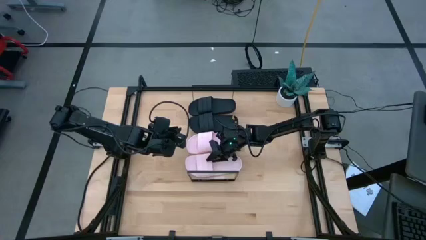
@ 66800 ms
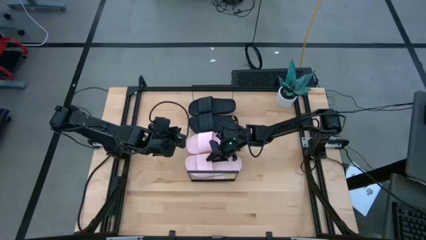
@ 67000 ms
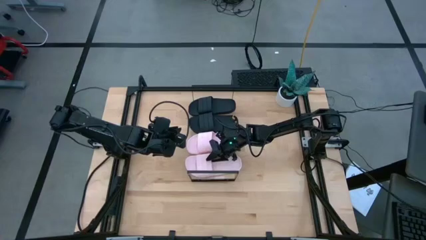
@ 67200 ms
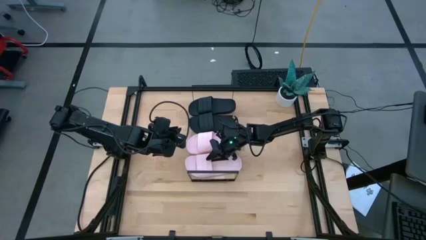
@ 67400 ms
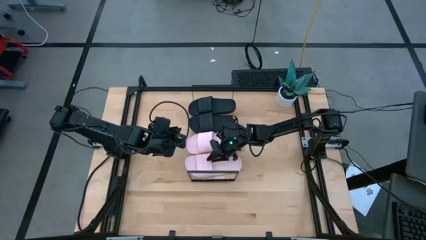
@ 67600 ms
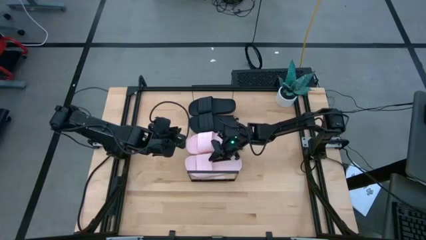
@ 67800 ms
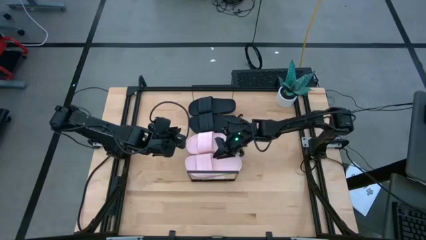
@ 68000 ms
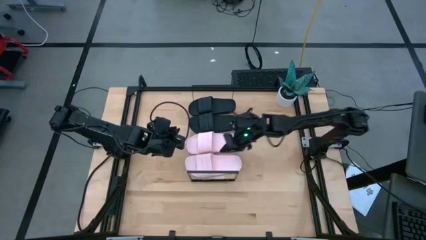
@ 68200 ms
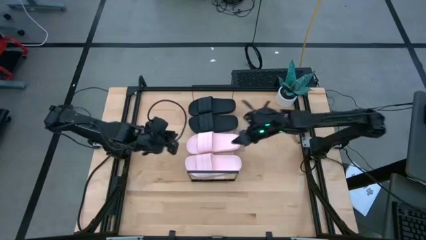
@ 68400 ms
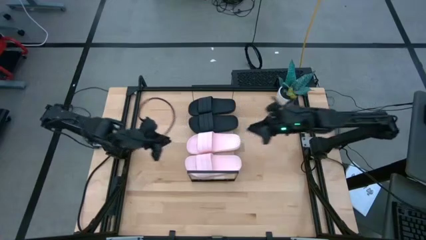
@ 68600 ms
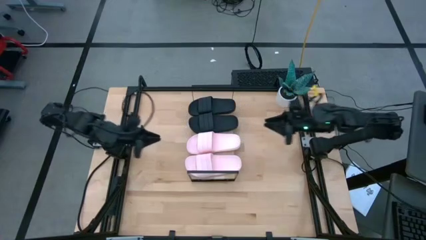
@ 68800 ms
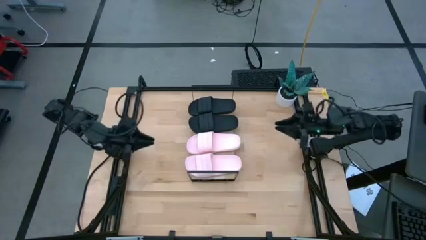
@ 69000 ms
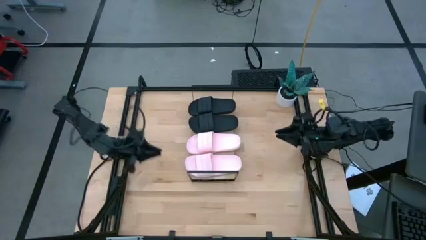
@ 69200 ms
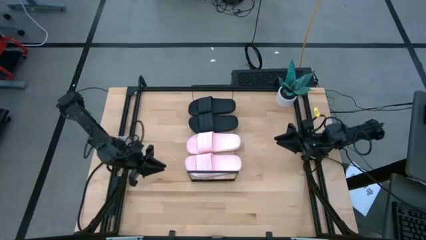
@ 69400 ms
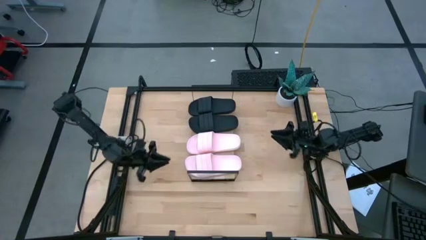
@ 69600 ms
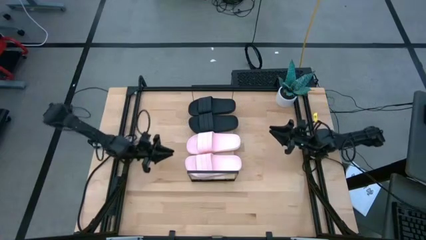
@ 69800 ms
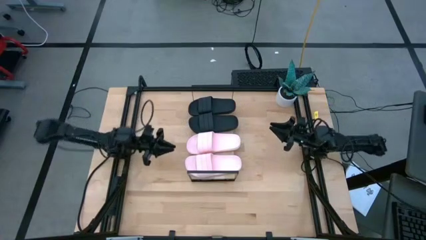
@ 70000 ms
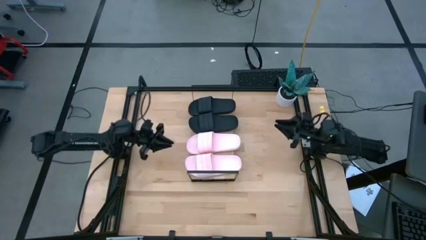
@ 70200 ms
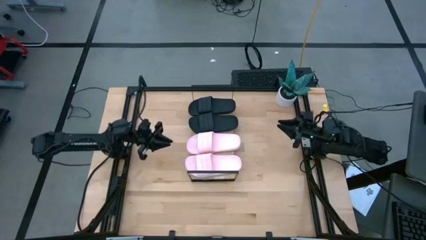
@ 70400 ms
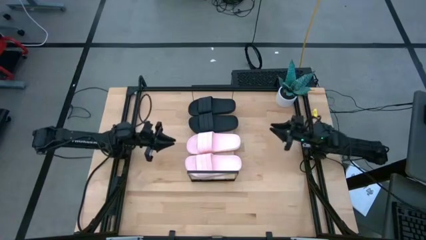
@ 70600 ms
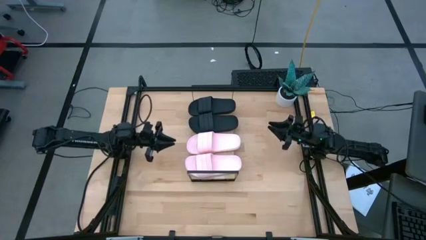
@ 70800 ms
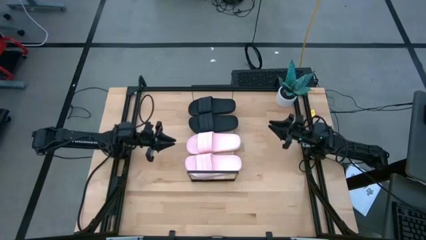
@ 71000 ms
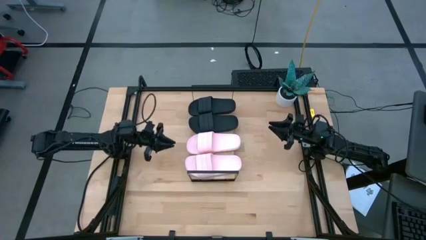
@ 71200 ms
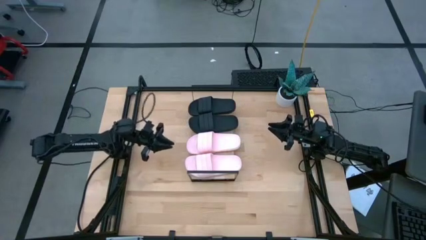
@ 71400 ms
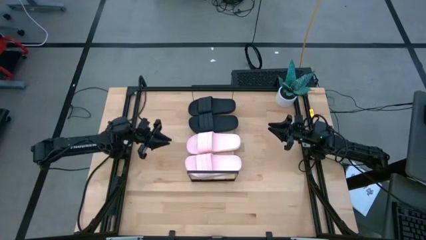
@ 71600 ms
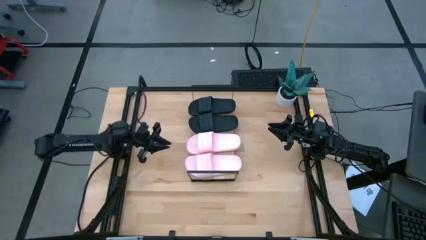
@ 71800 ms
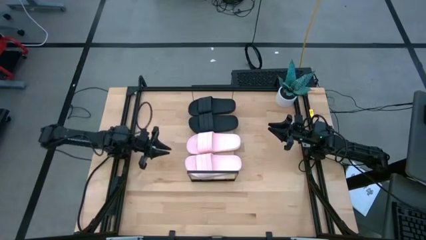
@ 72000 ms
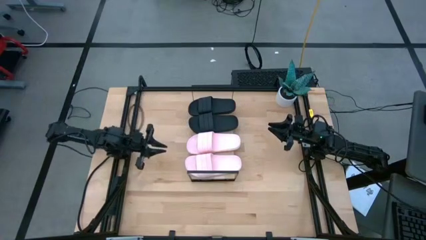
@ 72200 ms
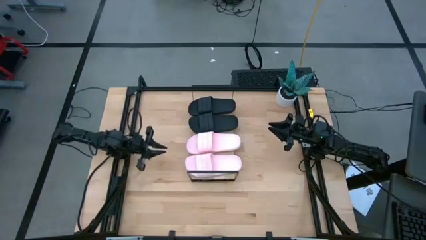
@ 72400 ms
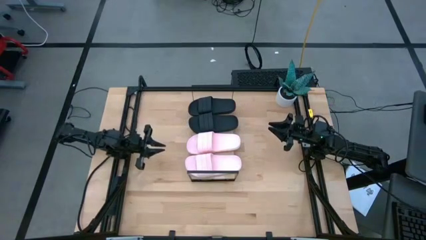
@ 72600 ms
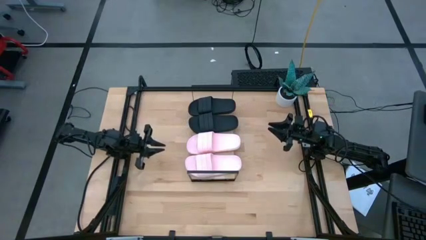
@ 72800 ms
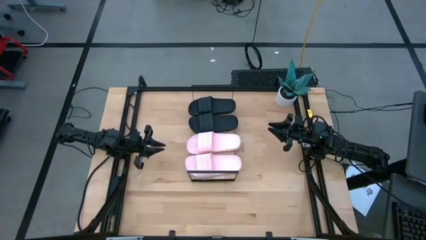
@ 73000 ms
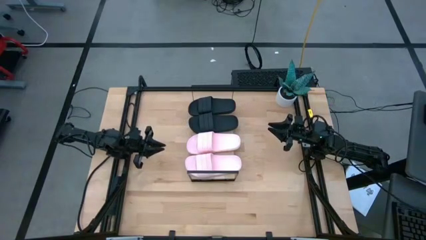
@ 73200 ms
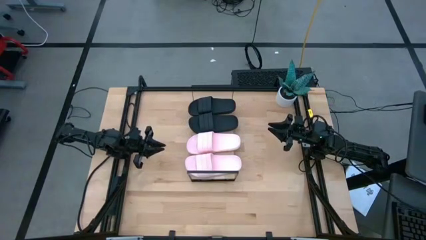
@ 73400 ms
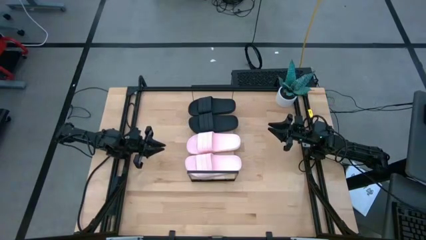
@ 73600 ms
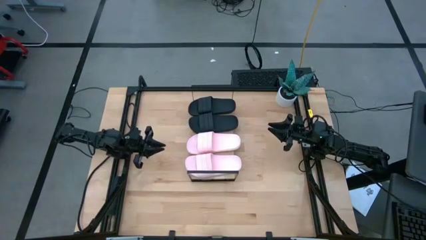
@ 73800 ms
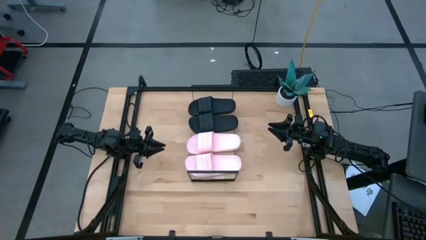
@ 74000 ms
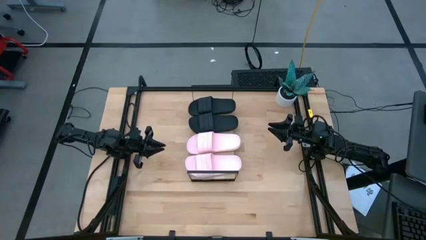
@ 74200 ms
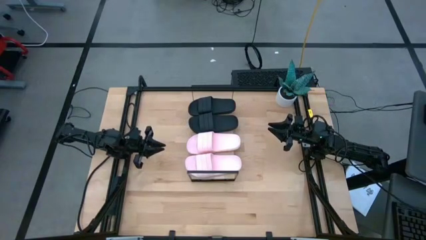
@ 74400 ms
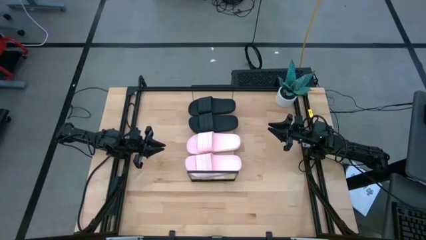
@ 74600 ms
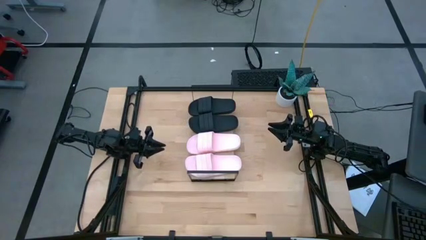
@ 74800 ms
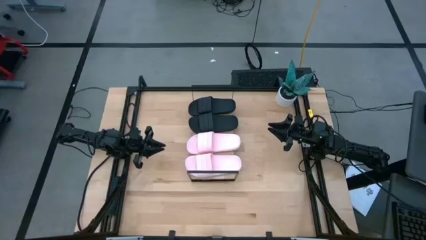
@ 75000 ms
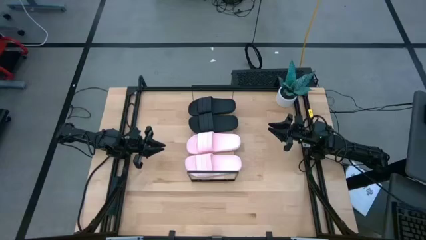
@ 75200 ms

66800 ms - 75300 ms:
Task: Pick and place slides into the shelf
Return to Home Position

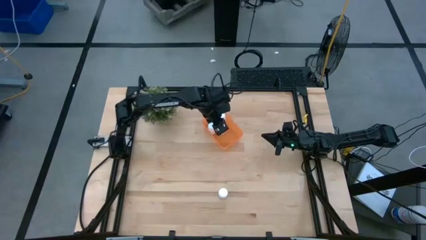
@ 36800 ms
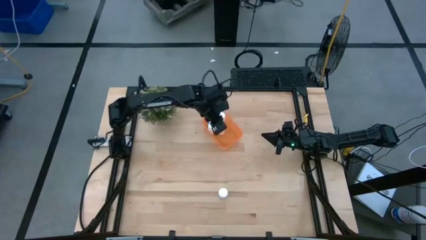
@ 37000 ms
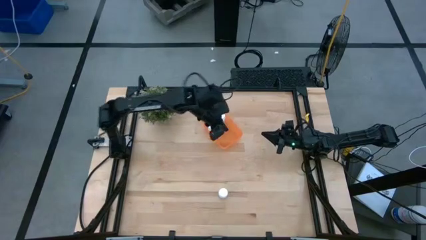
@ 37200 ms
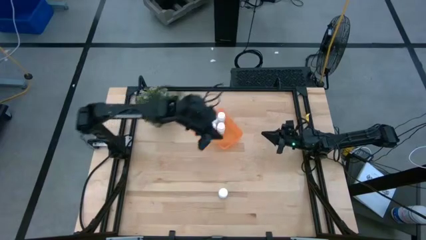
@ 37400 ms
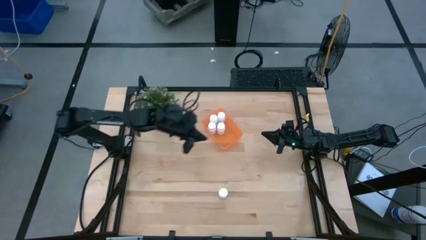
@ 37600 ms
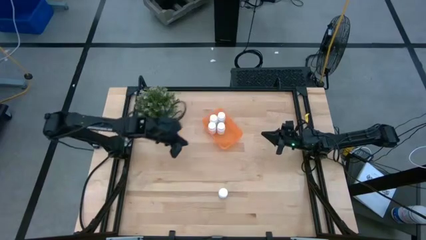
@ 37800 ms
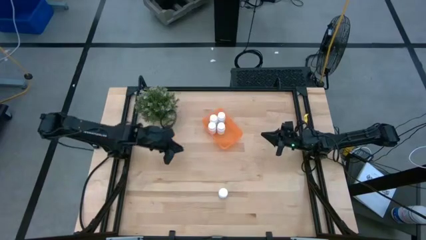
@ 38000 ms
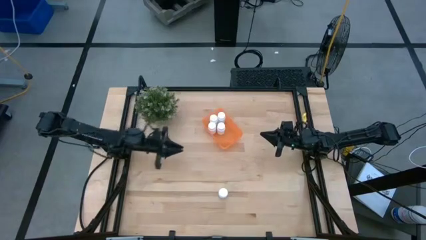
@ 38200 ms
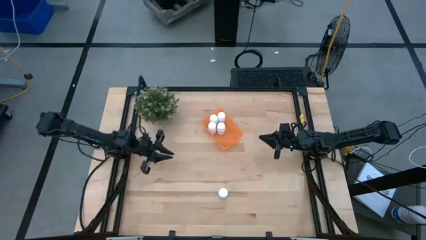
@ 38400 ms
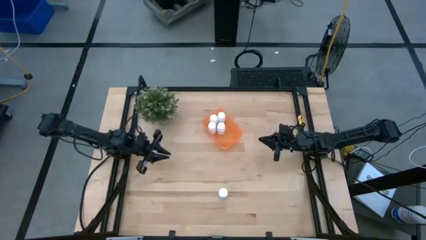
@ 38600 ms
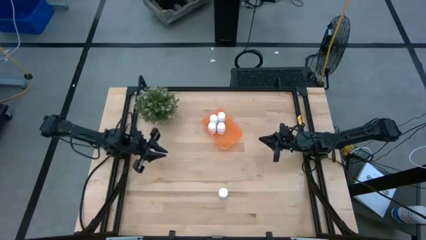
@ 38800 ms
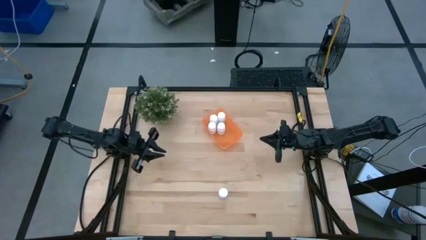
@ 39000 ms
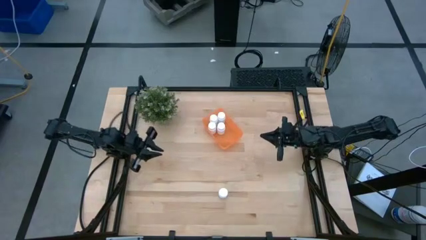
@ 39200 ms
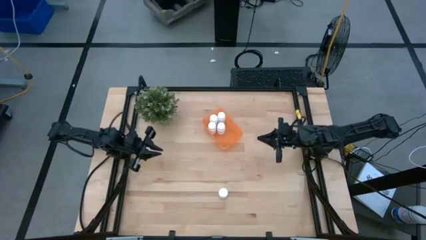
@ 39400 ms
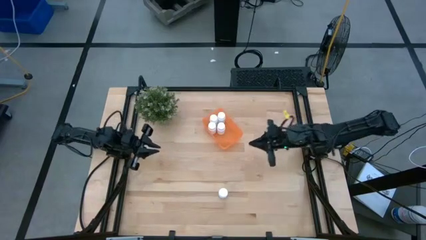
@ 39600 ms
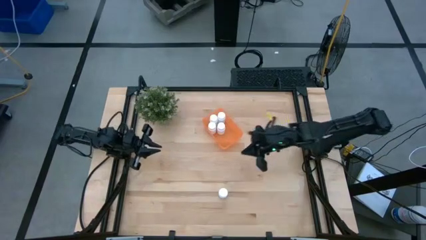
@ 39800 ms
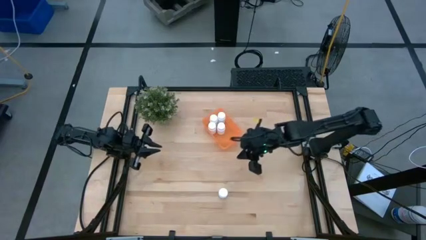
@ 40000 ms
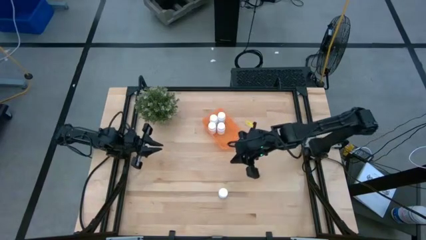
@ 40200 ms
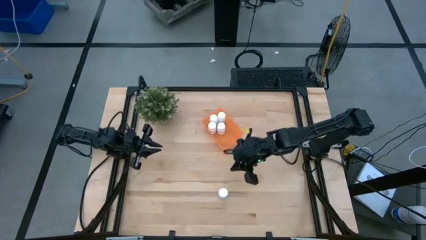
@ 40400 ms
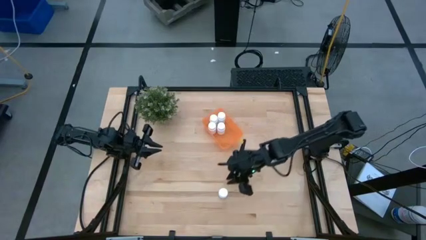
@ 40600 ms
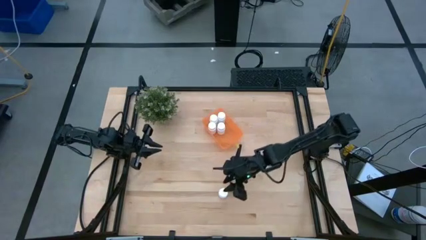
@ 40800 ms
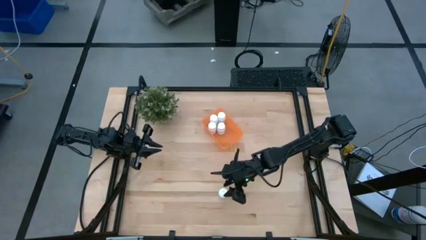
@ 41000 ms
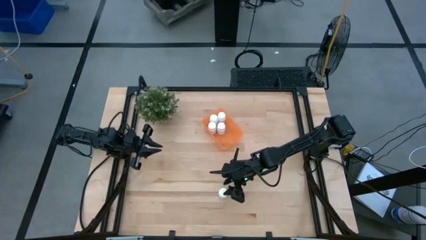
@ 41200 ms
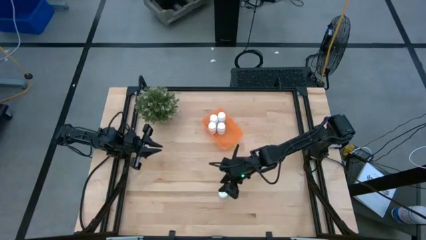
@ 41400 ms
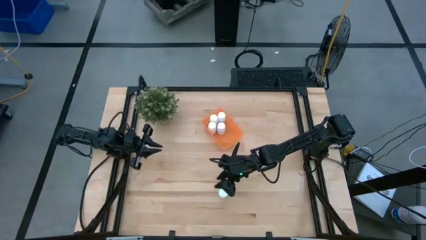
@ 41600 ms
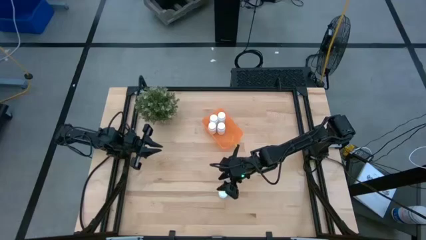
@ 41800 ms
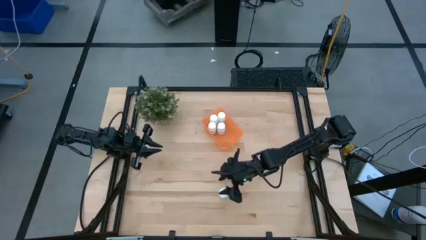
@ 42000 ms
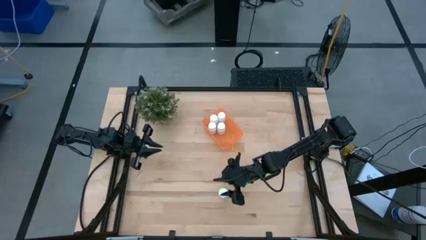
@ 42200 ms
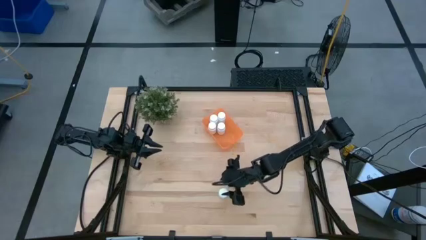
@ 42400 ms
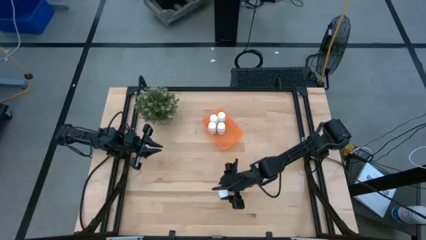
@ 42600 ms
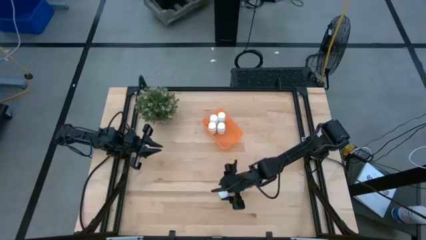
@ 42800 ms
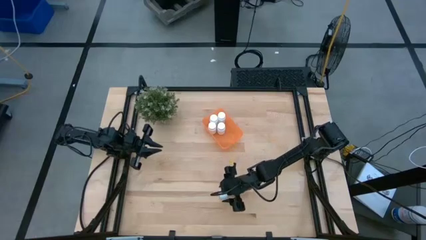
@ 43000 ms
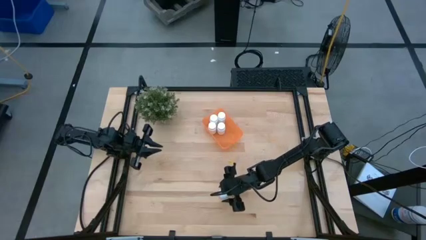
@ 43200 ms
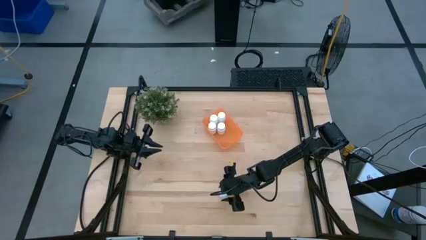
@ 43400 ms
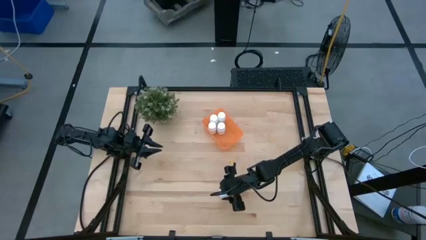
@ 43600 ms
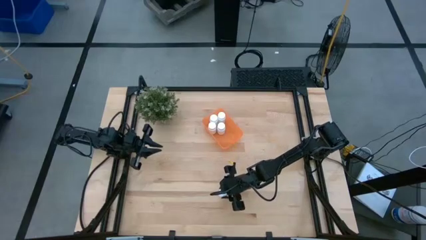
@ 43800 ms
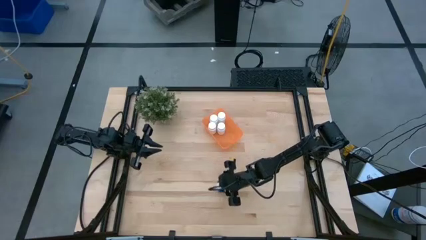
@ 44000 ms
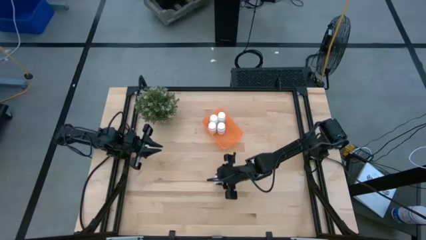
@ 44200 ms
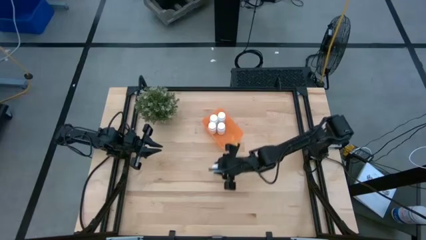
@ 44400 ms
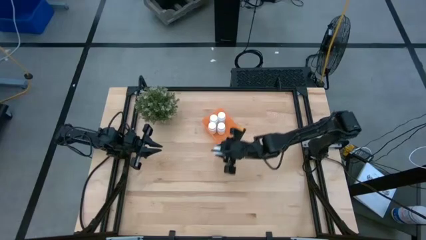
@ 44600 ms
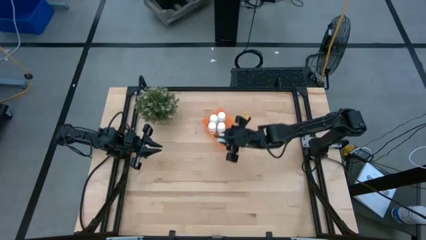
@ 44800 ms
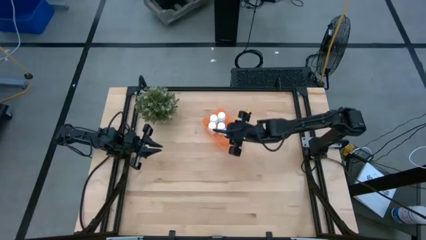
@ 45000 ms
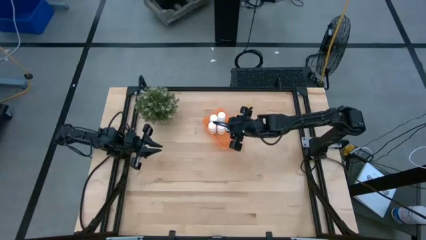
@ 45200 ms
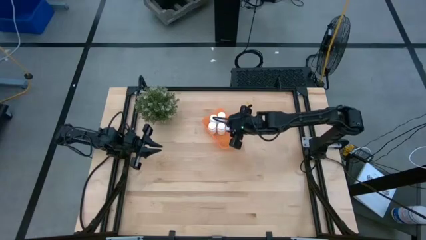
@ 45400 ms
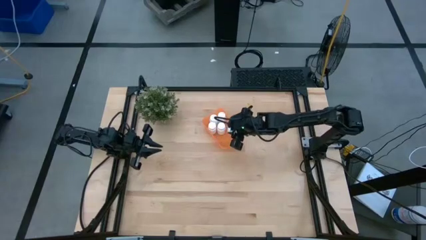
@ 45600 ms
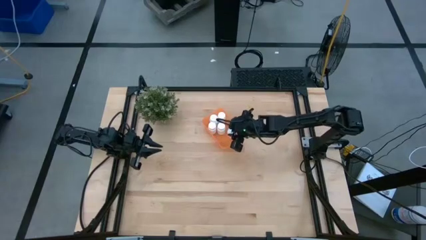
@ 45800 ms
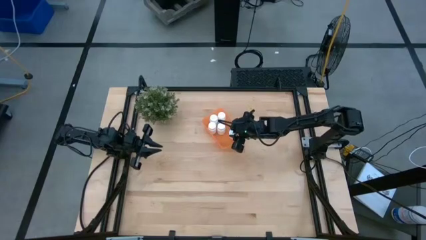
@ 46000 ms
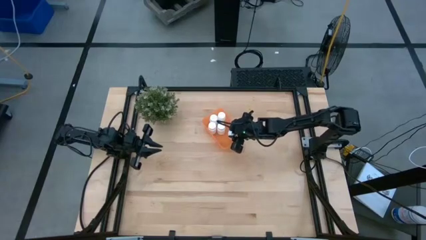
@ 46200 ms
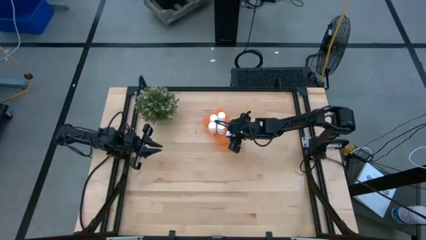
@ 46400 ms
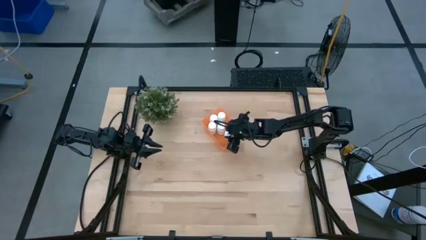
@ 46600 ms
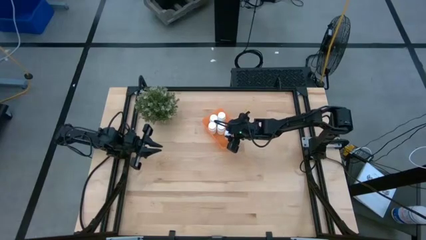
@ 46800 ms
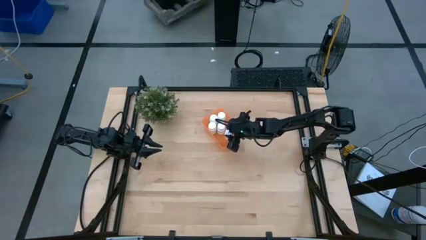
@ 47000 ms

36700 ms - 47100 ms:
Task: Pick and place pill bottles into a basket
Put the white pill bottle into the orange bin
